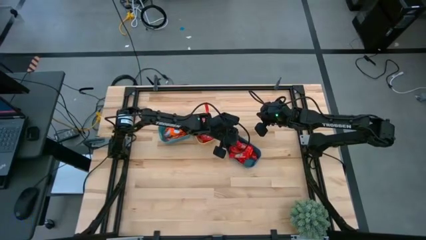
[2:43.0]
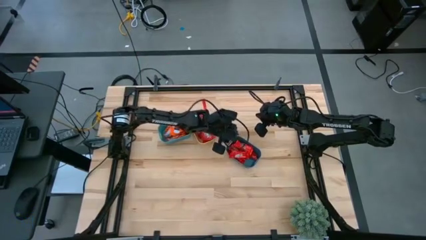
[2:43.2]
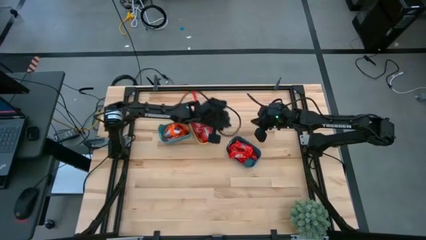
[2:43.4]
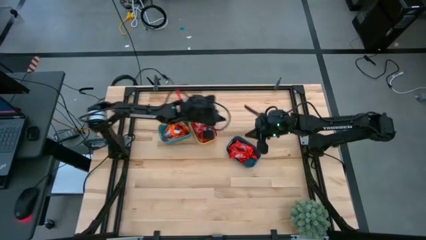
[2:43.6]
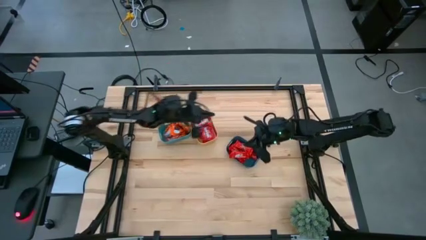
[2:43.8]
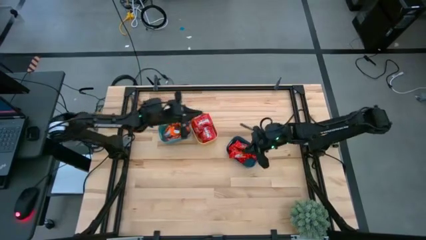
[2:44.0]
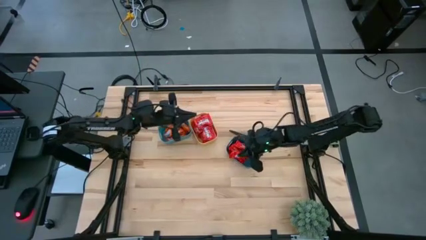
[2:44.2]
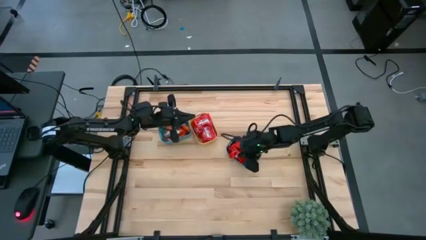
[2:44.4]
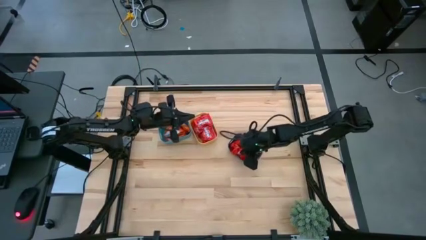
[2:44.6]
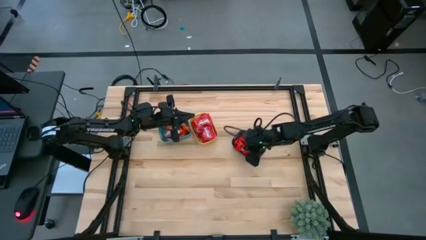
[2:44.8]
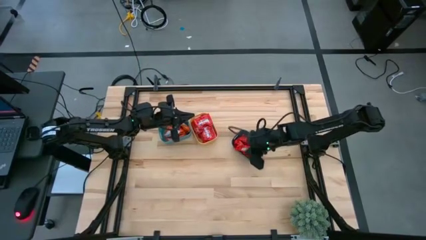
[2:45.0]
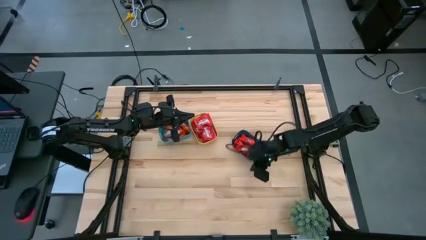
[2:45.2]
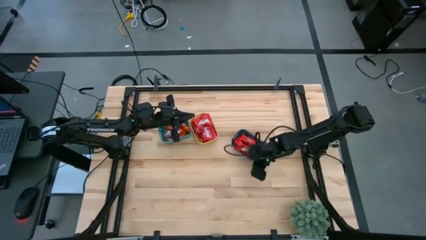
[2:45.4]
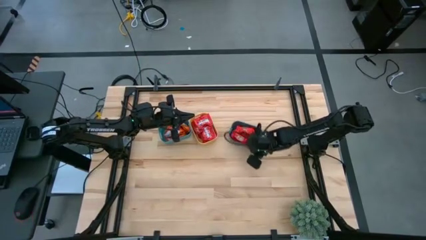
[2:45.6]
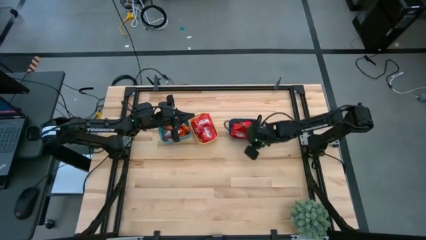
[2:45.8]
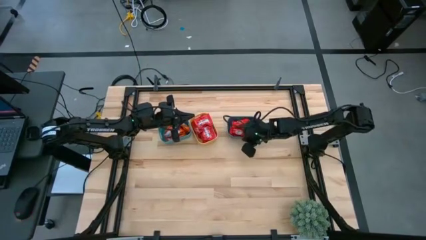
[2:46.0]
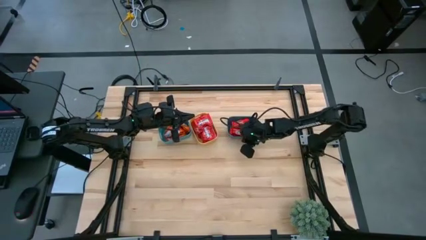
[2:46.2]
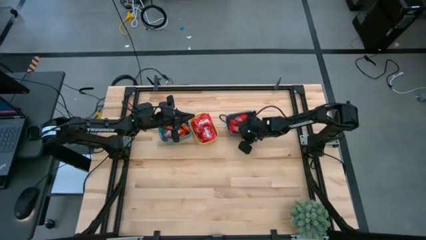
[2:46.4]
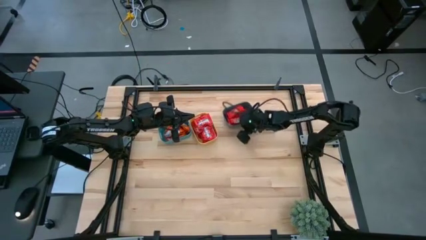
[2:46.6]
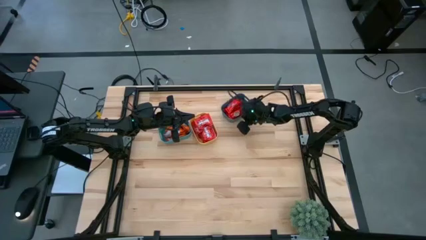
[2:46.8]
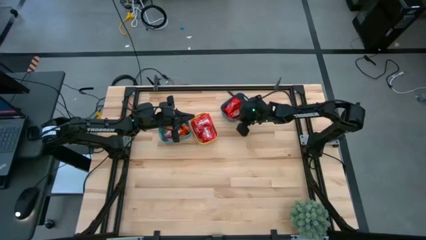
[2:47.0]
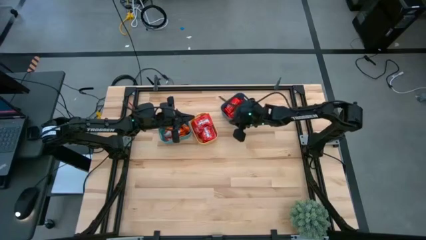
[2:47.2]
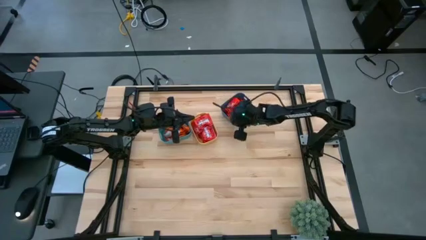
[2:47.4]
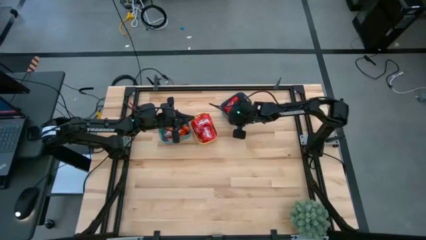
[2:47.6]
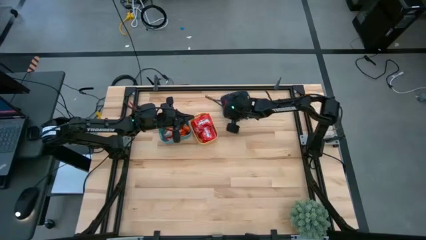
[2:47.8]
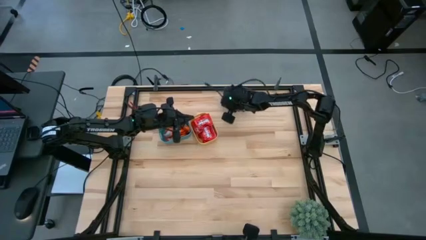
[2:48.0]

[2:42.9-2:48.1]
Task: Sort candy
Move the blue bin to the top of the table

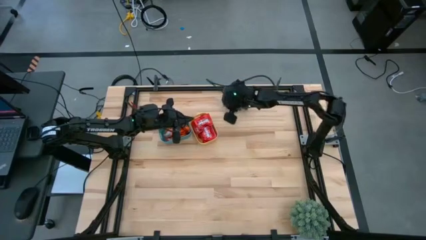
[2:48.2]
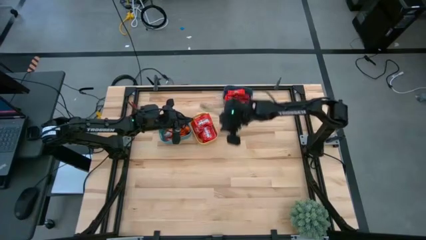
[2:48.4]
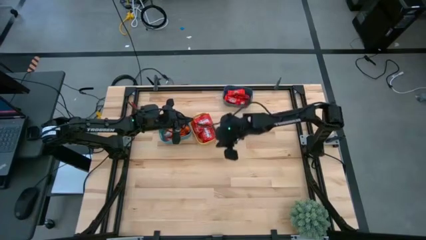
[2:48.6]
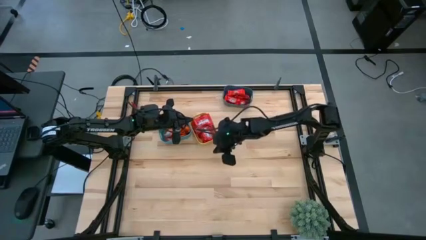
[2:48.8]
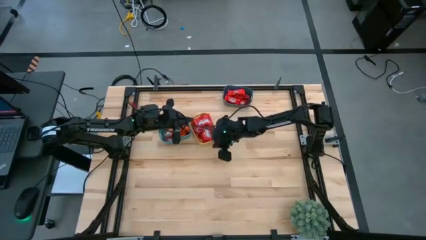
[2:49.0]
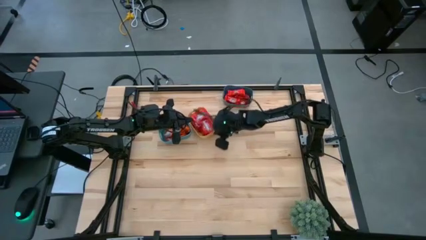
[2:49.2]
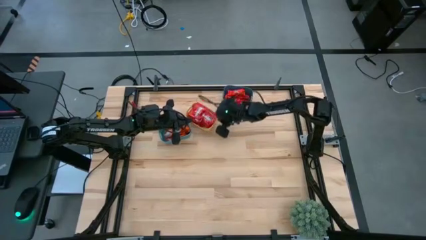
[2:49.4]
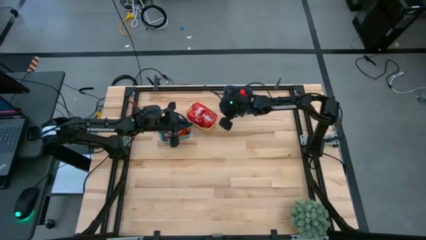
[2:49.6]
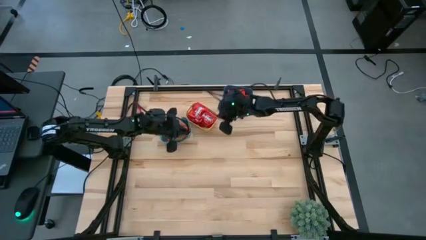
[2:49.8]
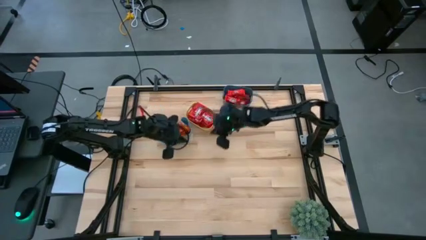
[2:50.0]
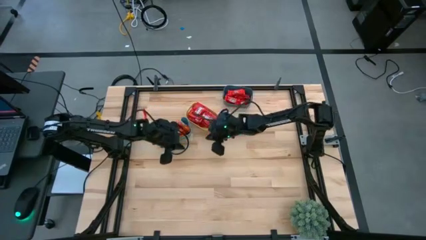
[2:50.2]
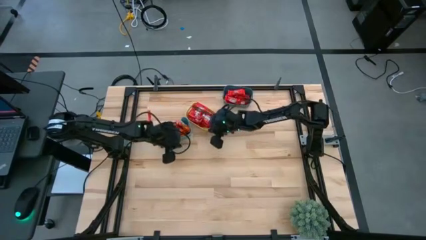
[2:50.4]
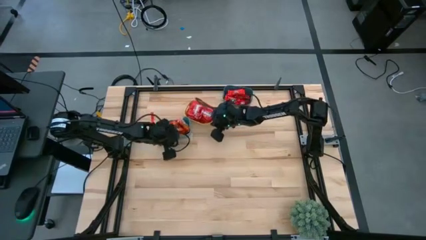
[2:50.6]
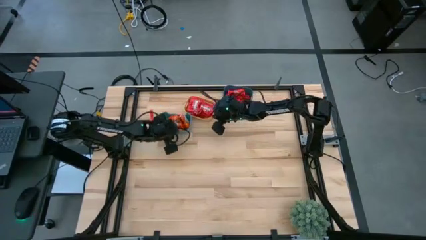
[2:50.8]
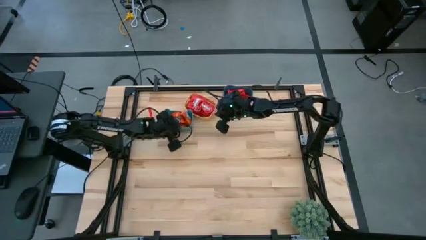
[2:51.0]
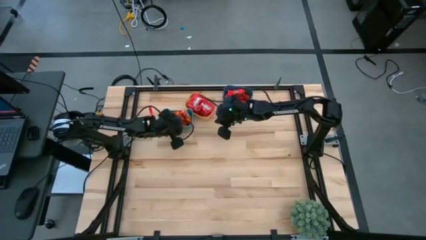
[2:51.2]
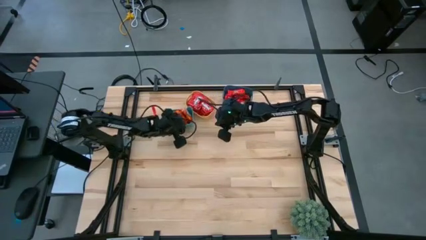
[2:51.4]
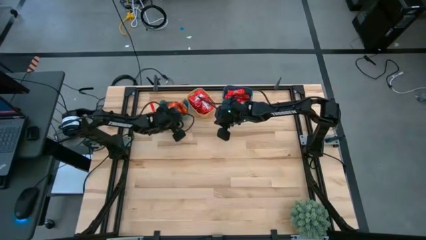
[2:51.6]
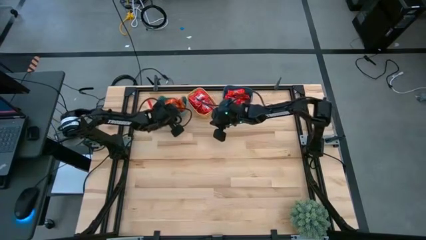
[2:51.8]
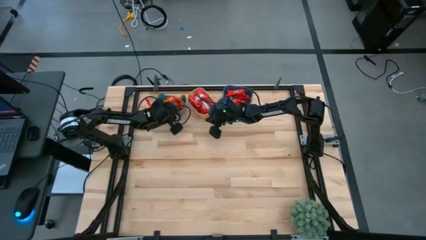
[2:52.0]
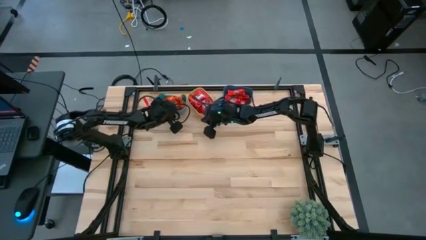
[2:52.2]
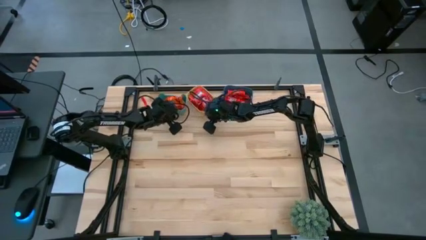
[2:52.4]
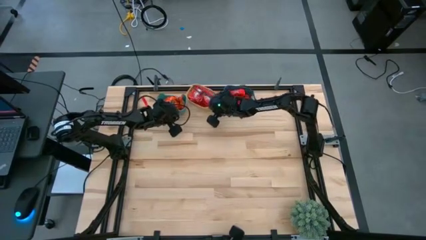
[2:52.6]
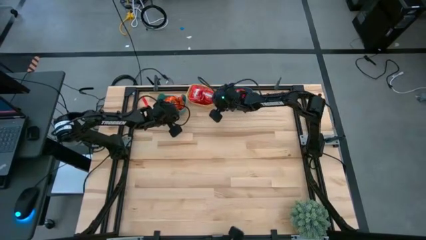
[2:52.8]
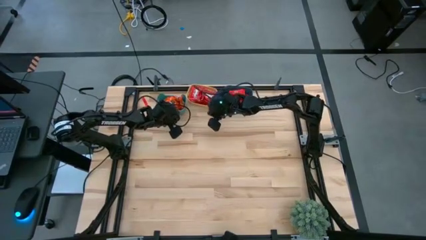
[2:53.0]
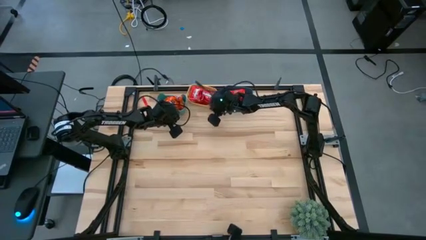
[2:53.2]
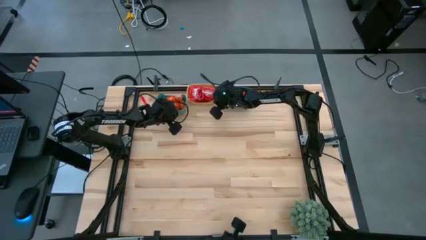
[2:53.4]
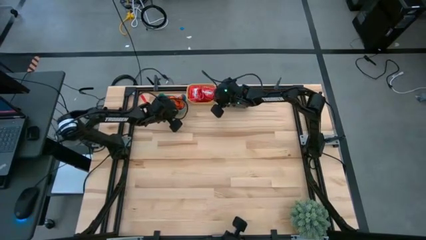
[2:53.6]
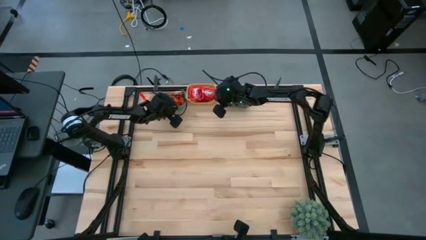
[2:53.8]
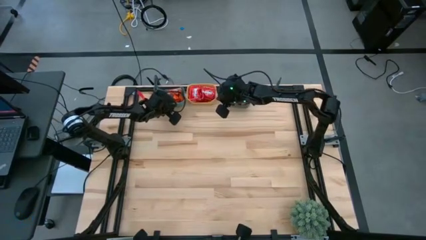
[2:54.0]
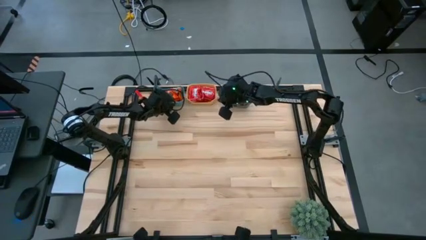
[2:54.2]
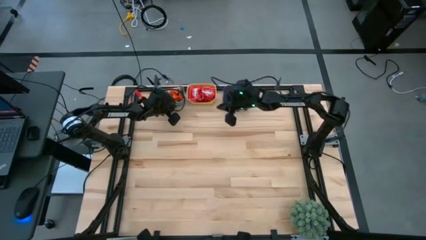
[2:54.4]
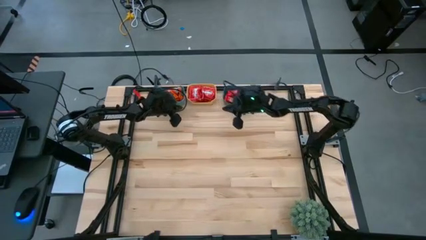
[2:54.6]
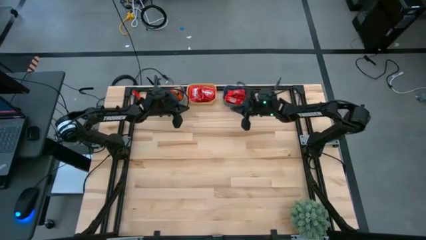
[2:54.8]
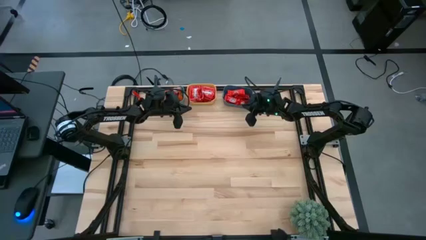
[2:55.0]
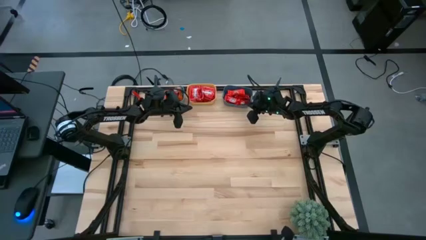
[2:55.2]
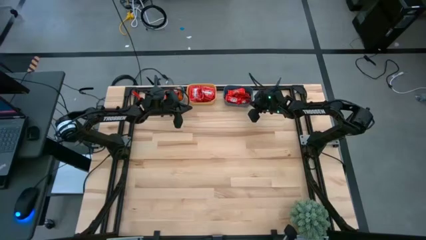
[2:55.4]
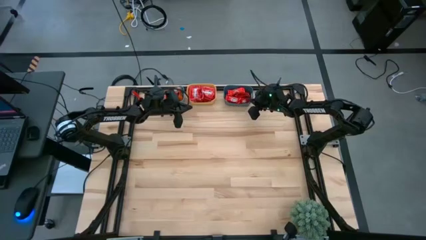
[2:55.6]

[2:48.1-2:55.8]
Adjust the colored bins aligned together
